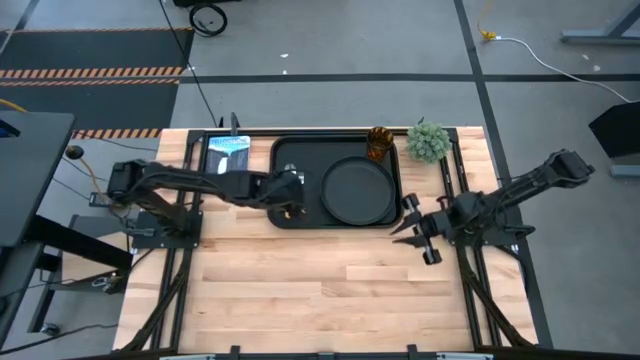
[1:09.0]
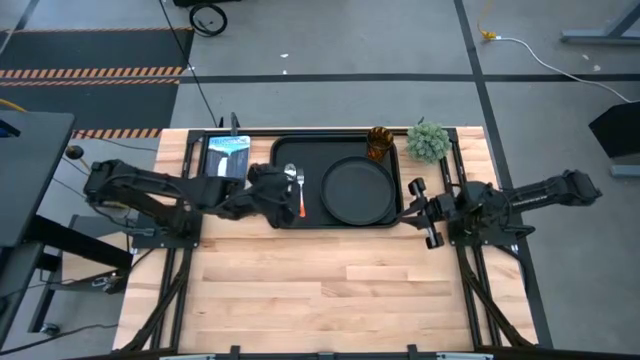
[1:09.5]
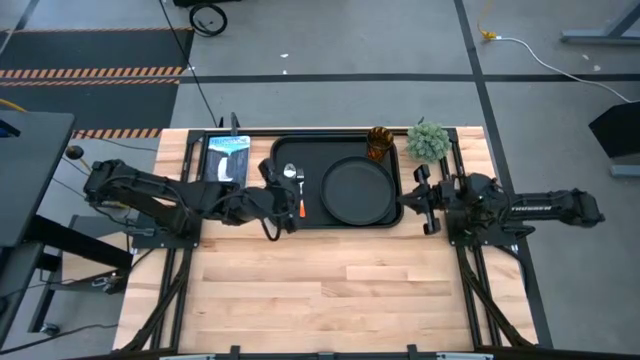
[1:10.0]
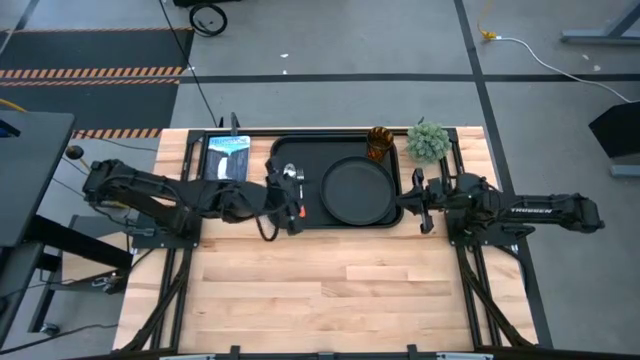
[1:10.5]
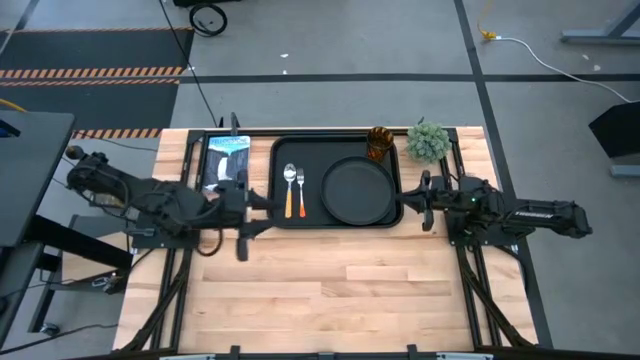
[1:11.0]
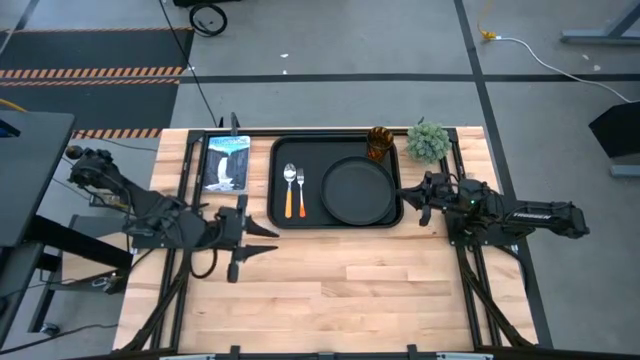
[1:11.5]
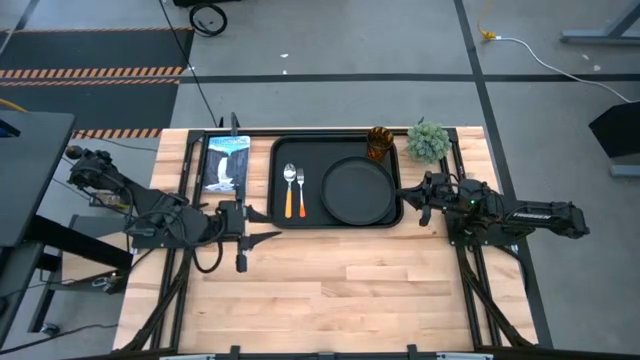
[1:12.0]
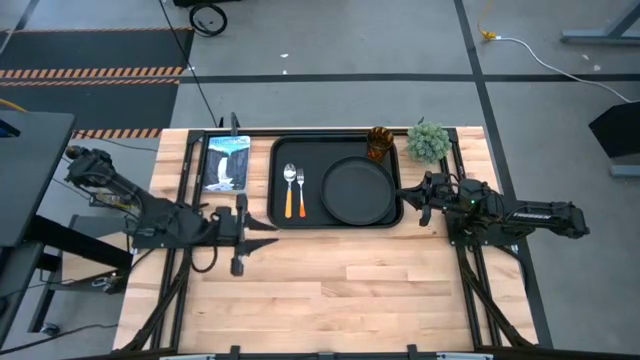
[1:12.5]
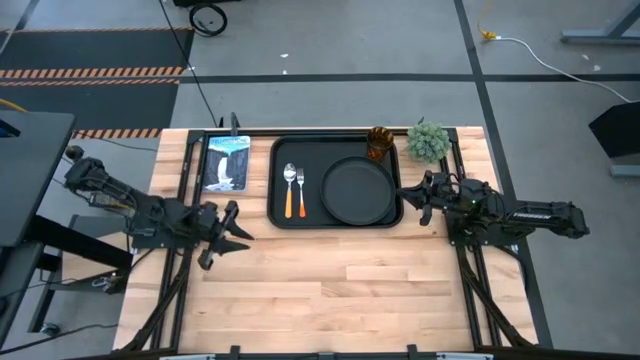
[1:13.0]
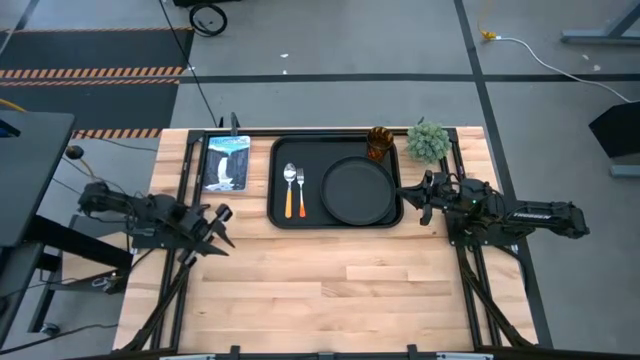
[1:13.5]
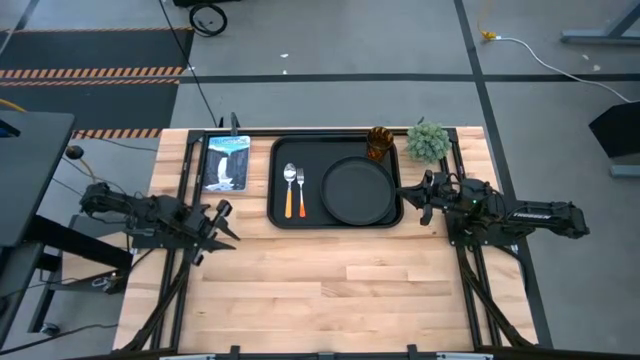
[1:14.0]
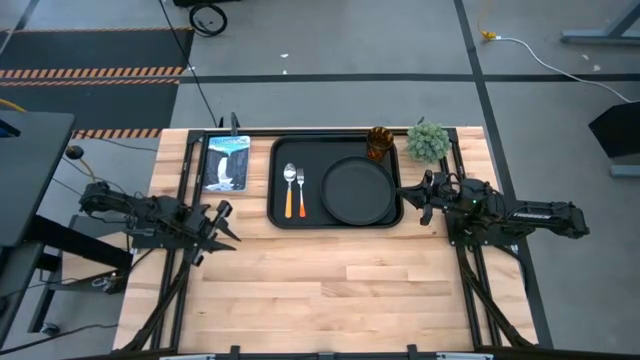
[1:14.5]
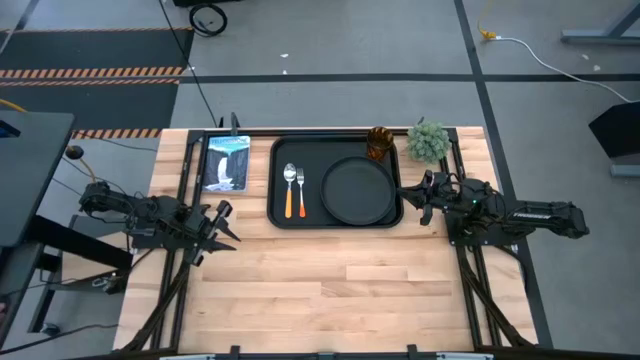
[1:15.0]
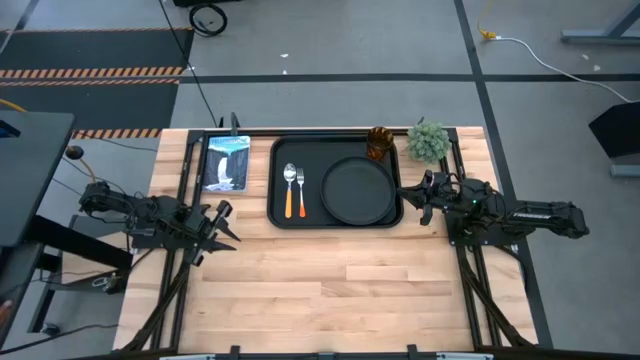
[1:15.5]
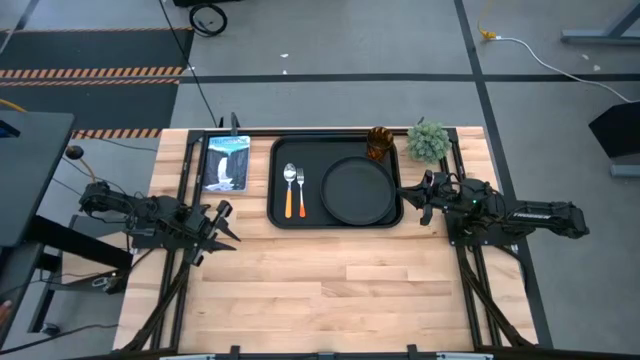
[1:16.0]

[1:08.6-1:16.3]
Task: Pick and place plate/cup/fork/spoon on tray
Return to Home Position

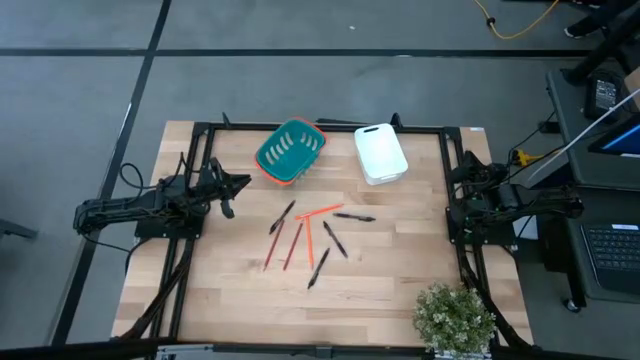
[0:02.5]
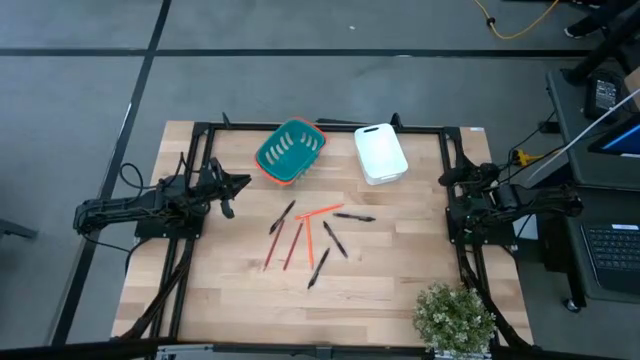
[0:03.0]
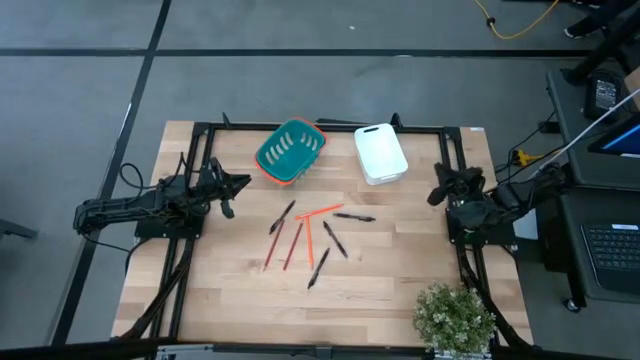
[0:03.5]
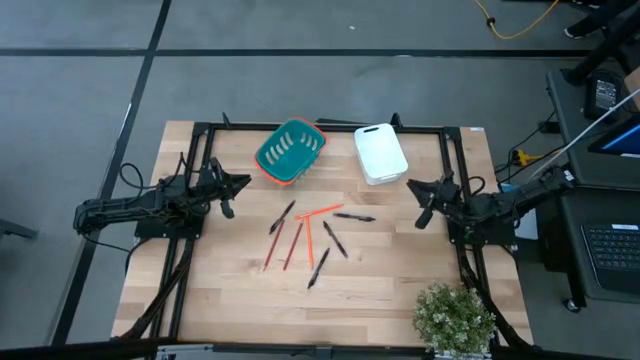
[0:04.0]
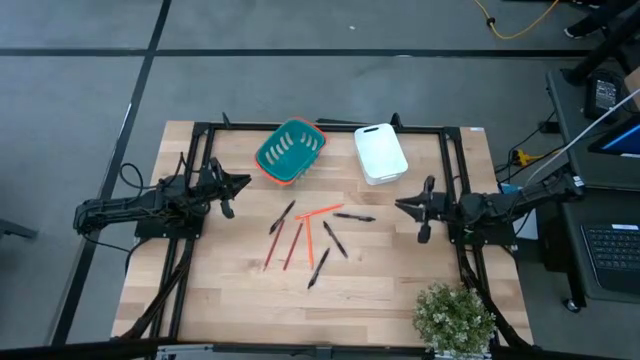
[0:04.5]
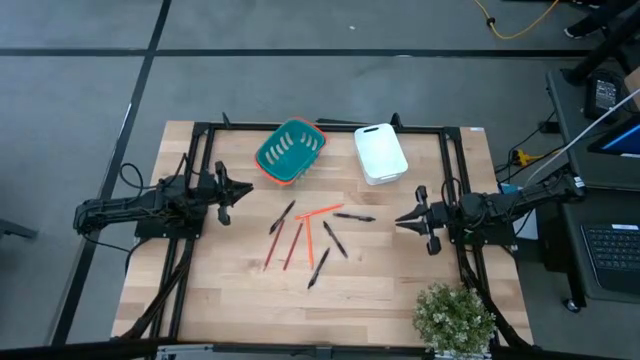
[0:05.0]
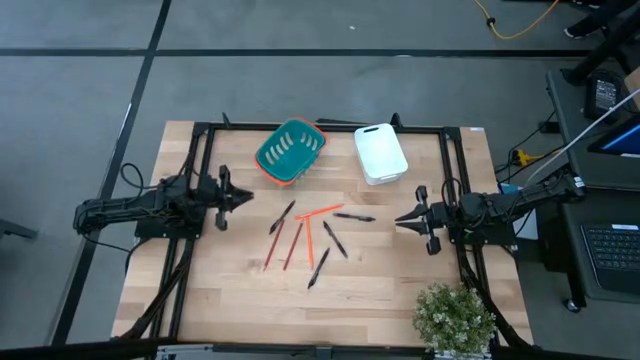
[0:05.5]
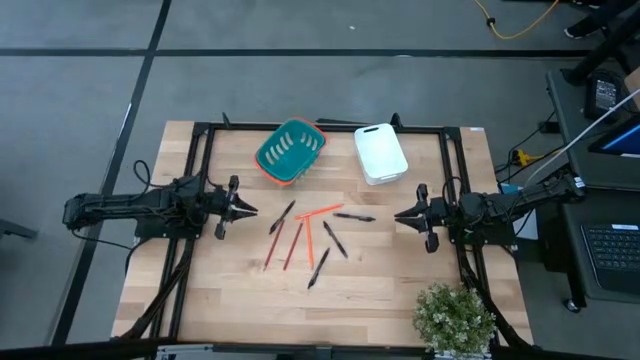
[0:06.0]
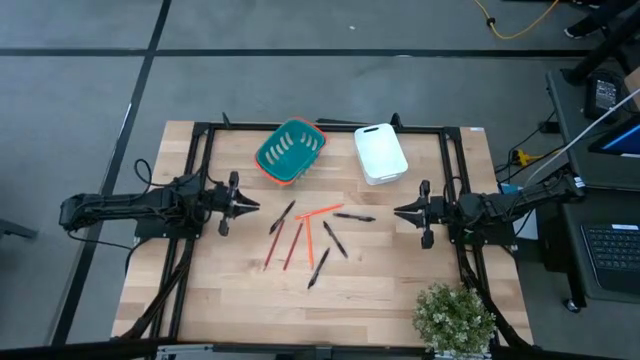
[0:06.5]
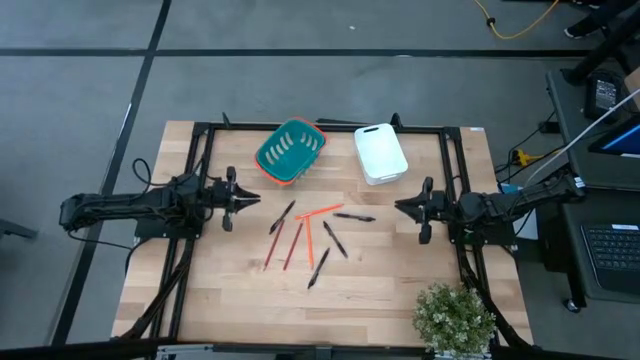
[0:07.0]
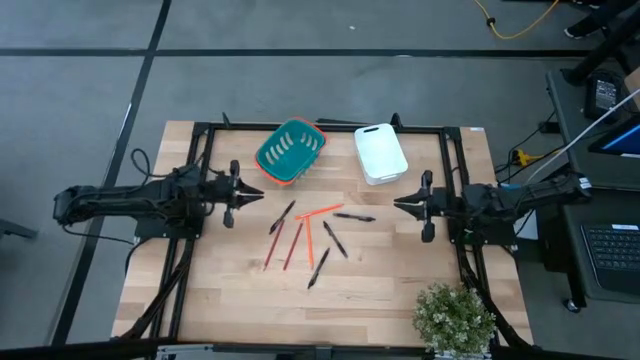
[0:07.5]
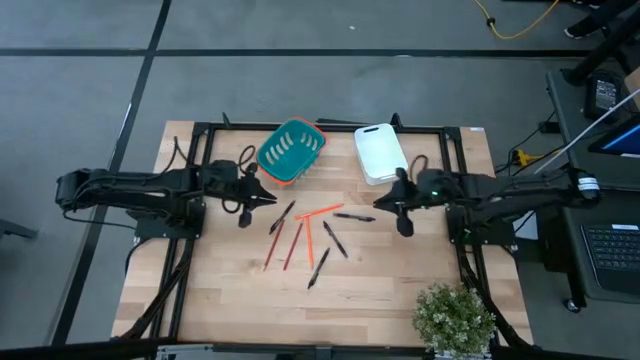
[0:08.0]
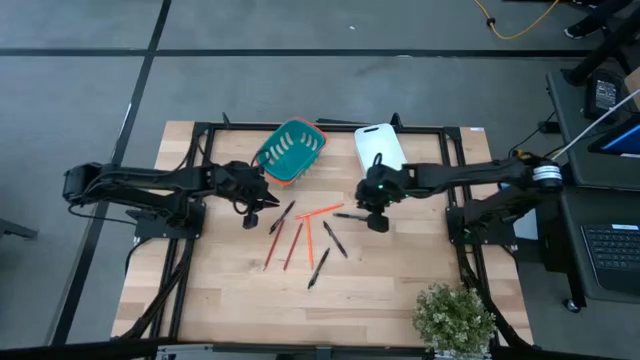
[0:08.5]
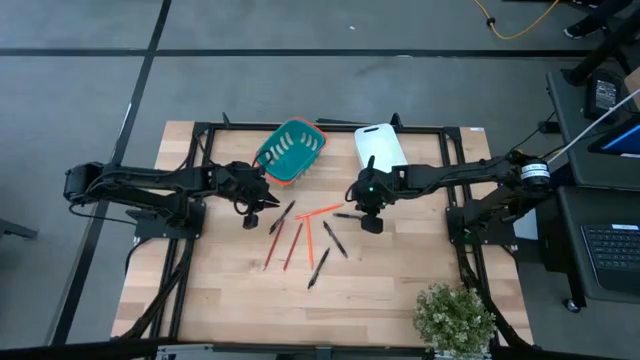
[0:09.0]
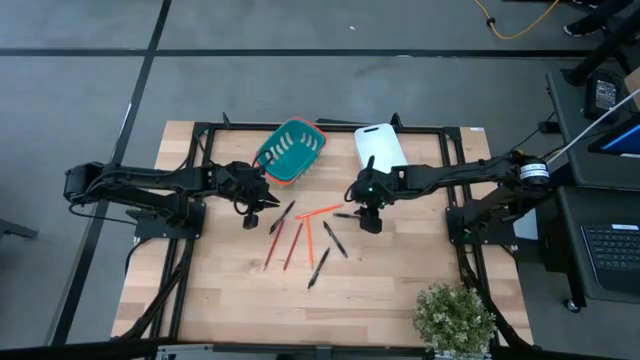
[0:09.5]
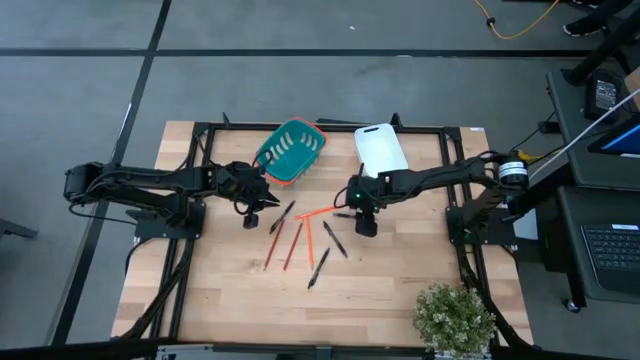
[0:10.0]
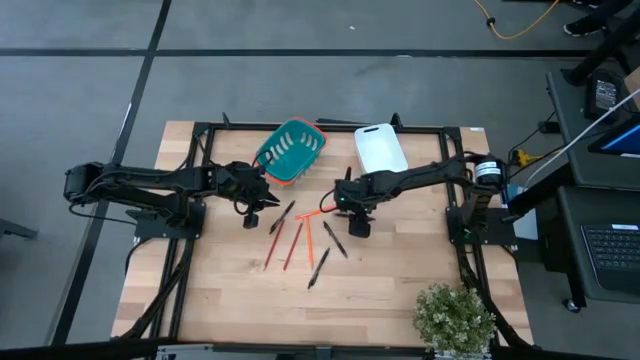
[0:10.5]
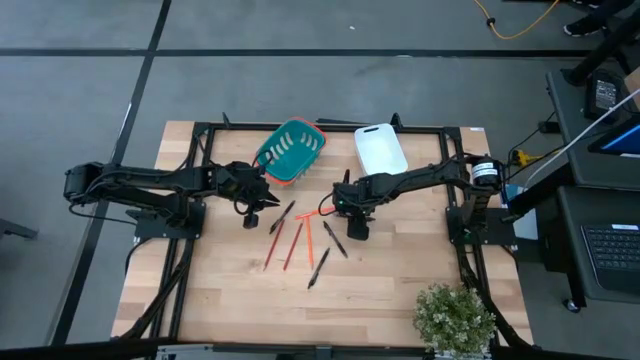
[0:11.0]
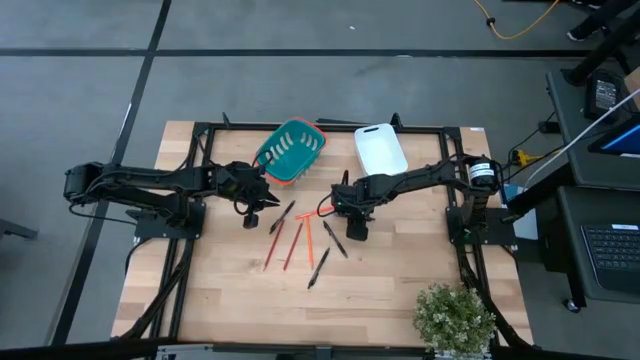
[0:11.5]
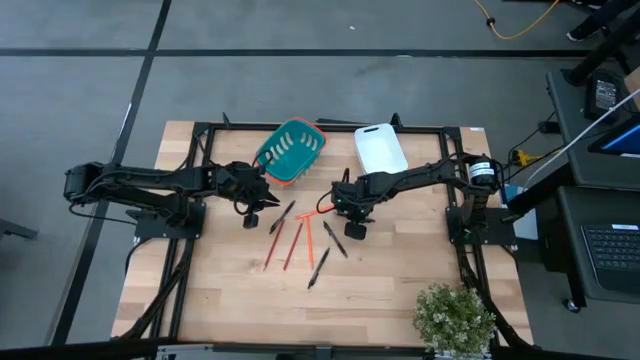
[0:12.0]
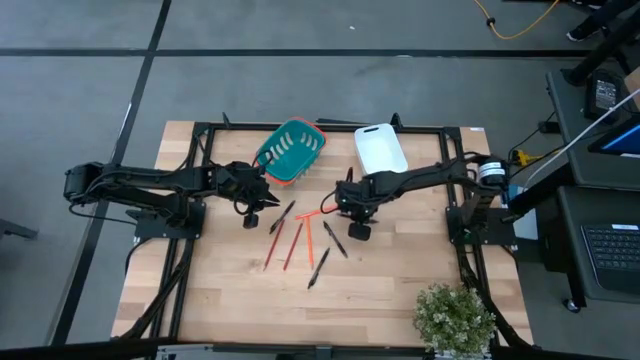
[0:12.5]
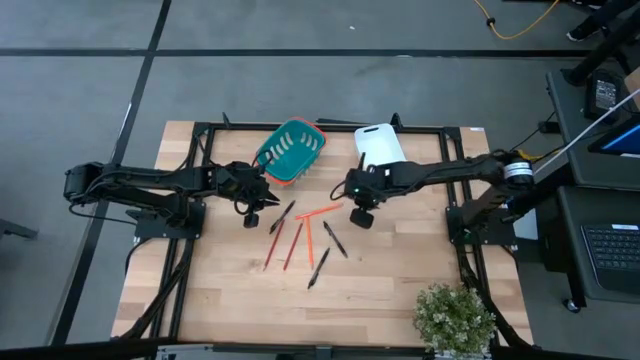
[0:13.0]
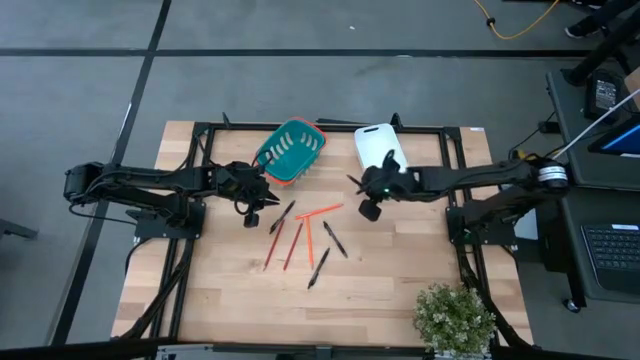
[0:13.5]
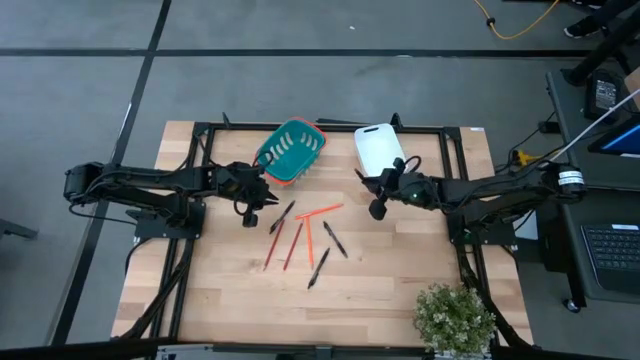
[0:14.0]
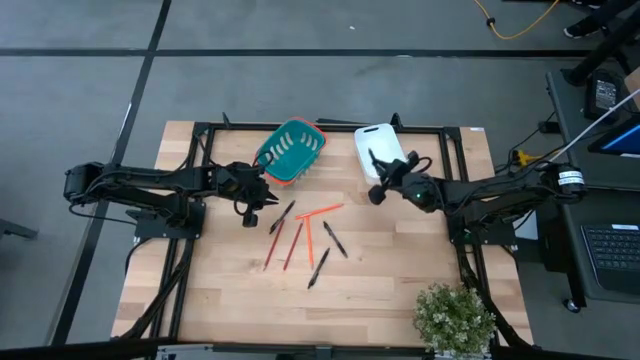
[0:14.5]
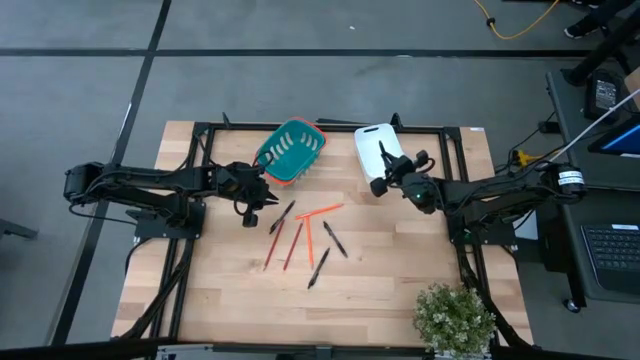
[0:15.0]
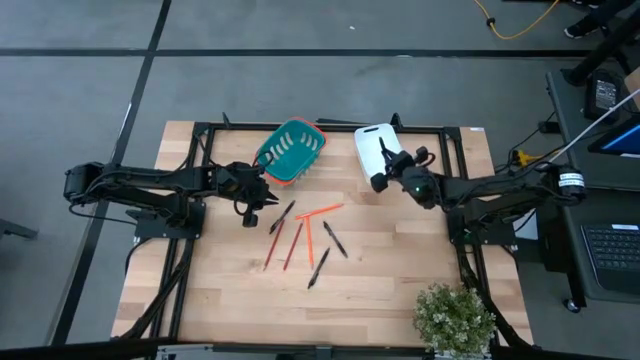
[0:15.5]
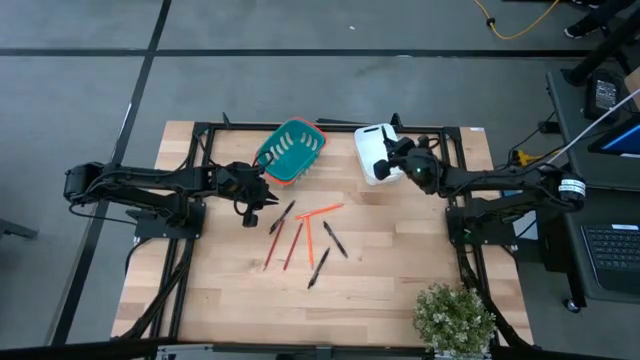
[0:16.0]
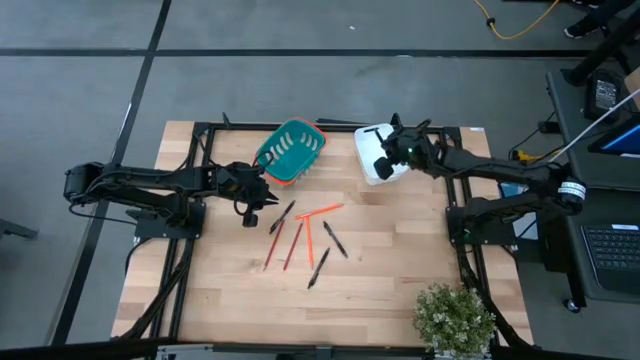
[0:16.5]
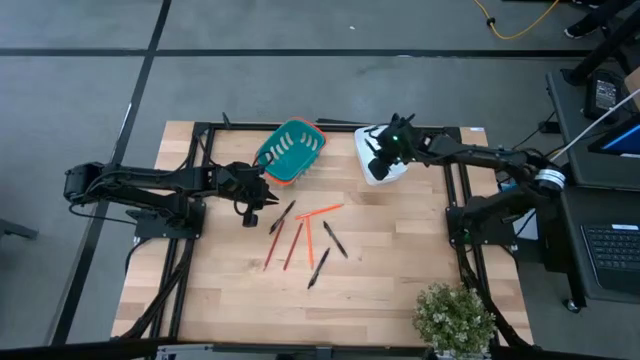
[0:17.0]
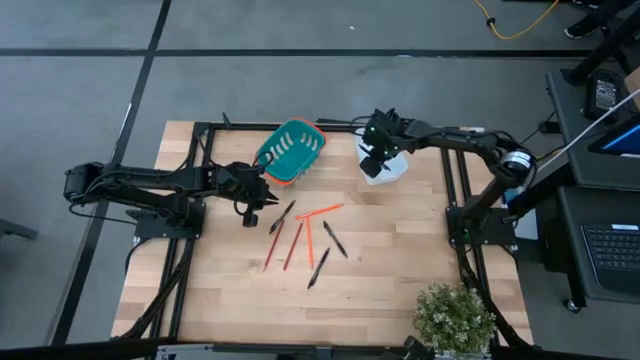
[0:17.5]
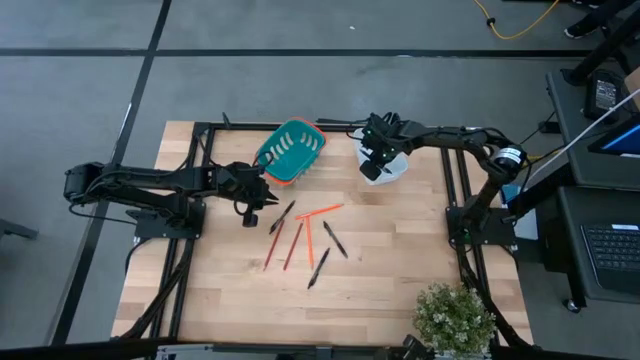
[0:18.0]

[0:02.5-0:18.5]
Task: Sort pens & pencils
Put the black pen into the white bin
